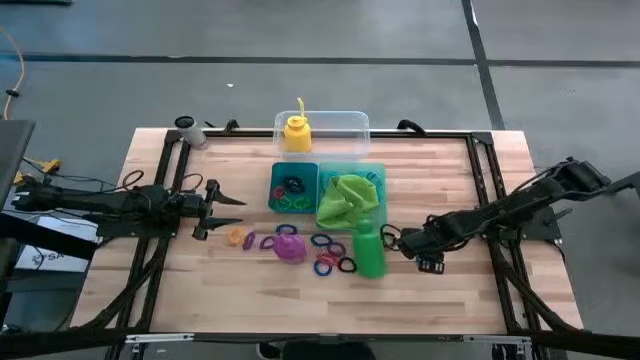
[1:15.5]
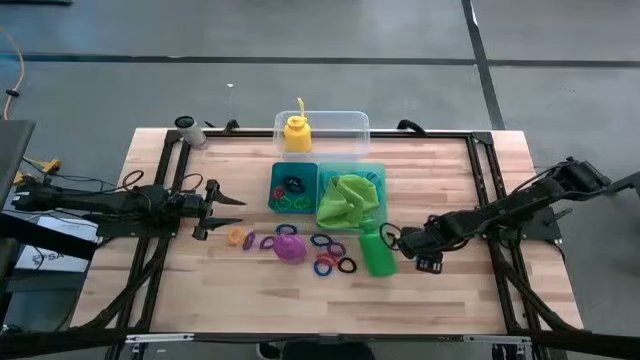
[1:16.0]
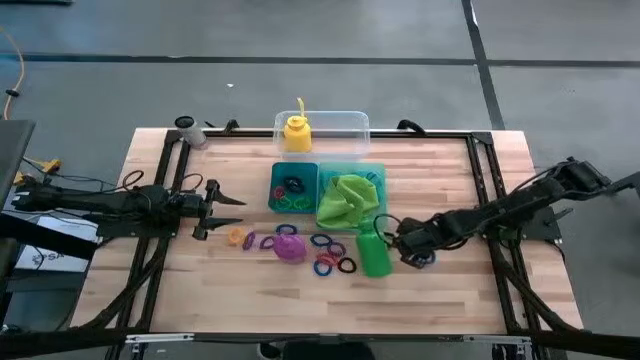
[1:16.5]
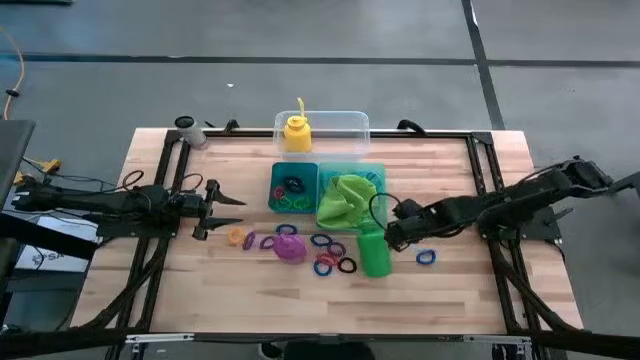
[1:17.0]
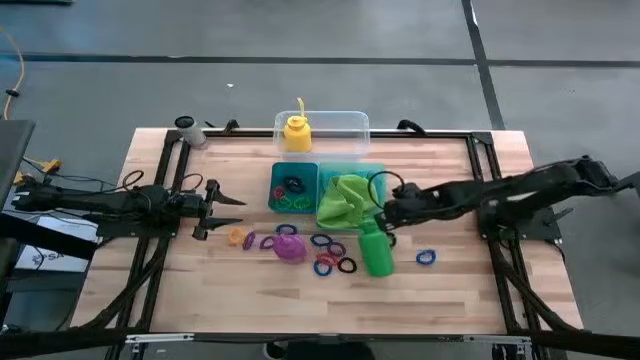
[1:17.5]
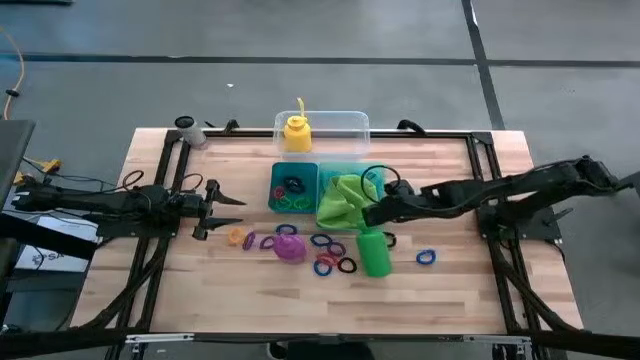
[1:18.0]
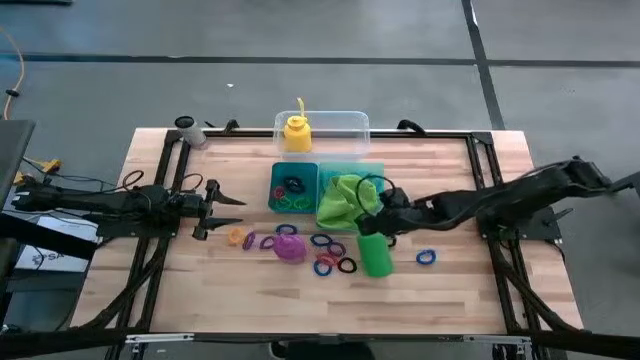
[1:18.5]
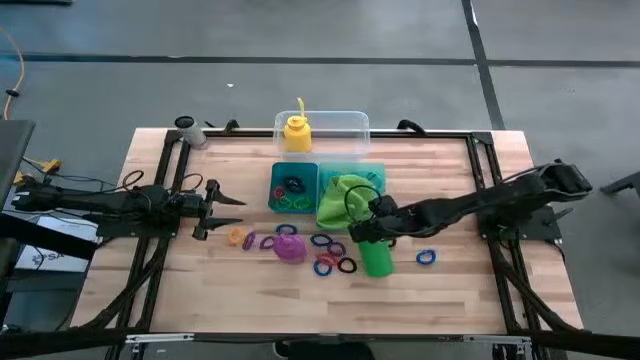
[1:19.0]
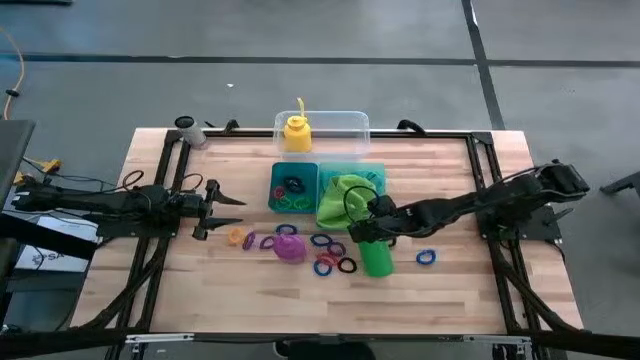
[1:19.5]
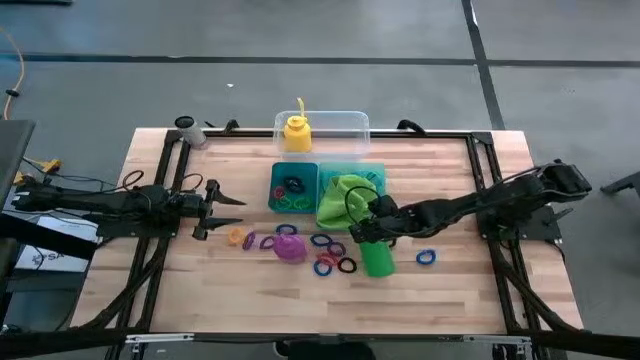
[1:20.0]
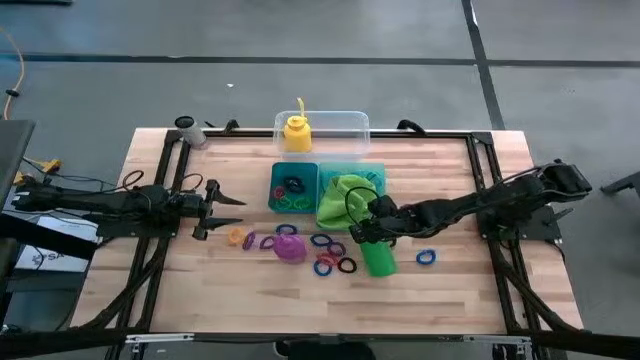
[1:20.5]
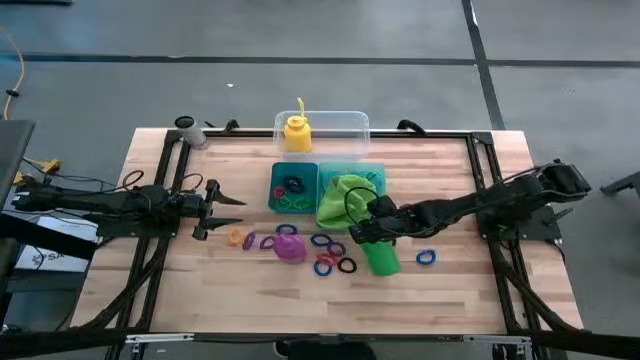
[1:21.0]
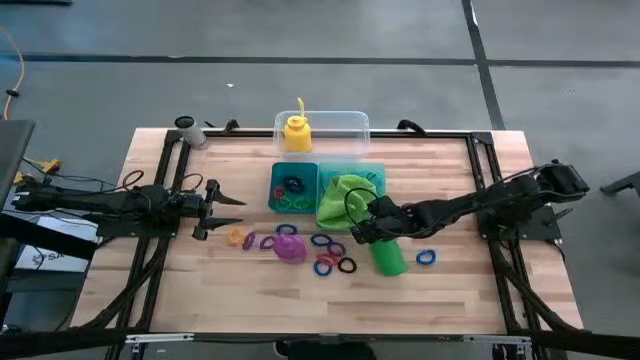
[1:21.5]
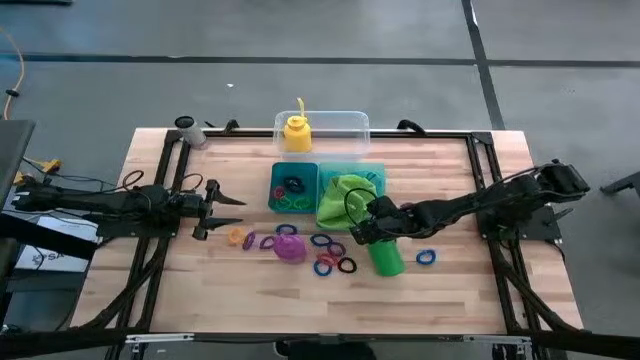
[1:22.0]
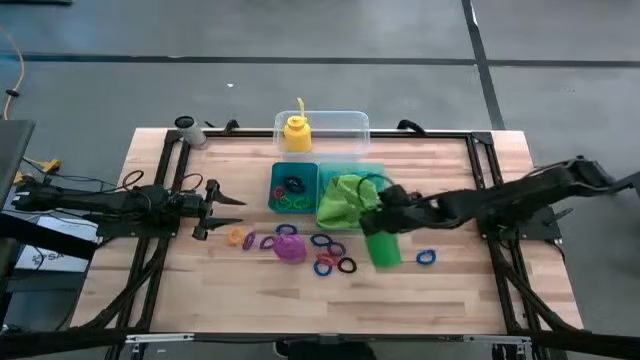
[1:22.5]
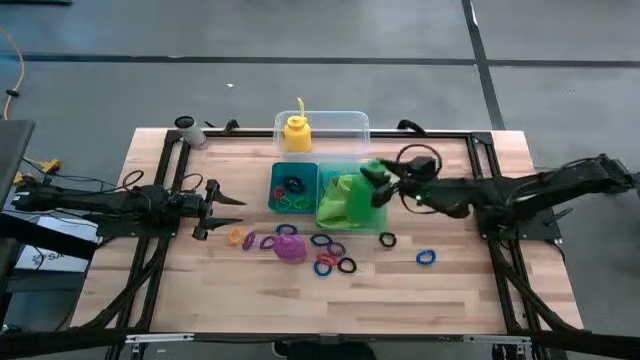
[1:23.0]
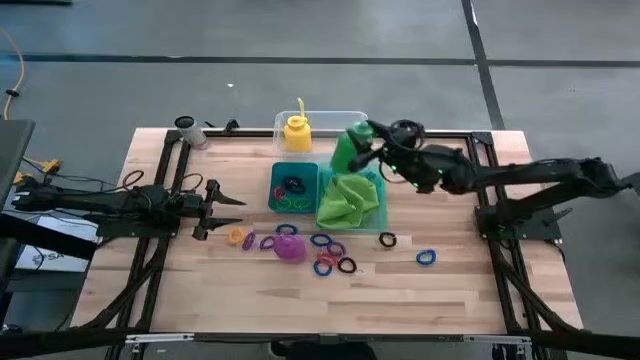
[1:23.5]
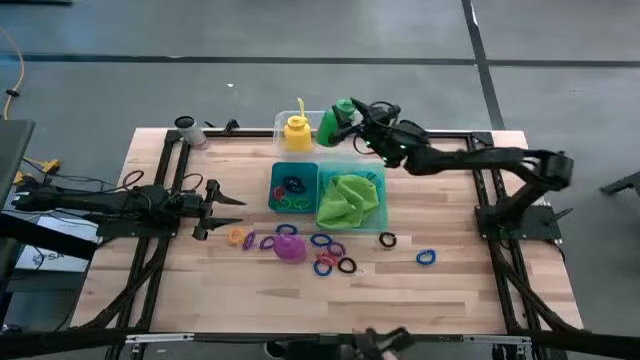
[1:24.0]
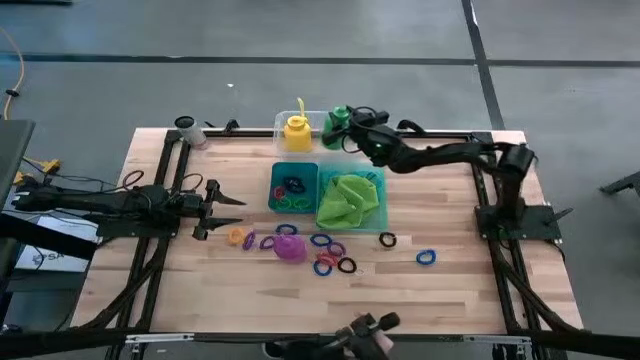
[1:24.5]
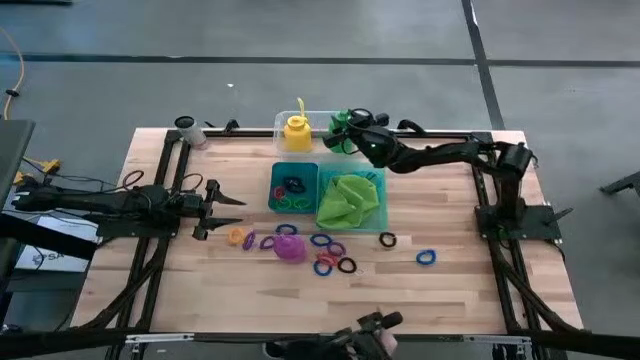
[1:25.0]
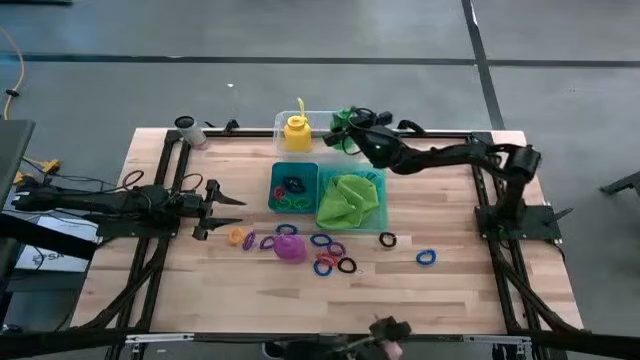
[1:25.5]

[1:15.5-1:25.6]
Task: Pick & Place Sports Items
Put the green tumbler into the transparent bin

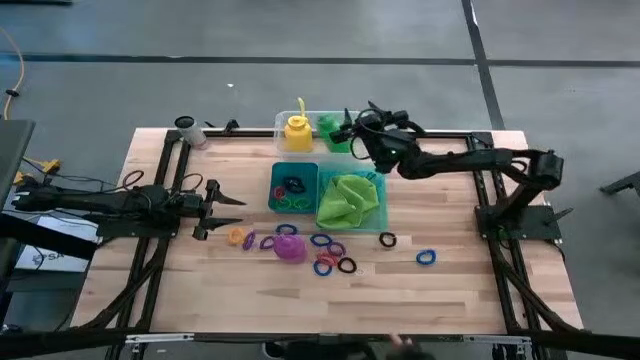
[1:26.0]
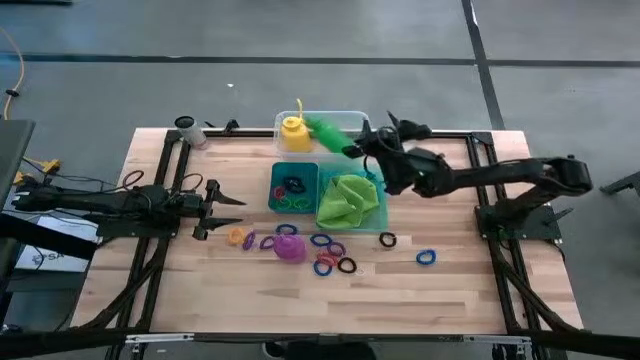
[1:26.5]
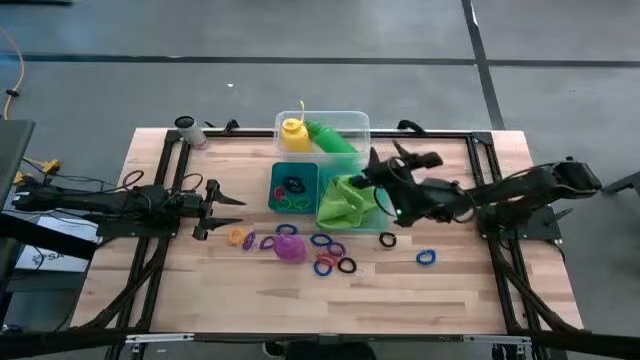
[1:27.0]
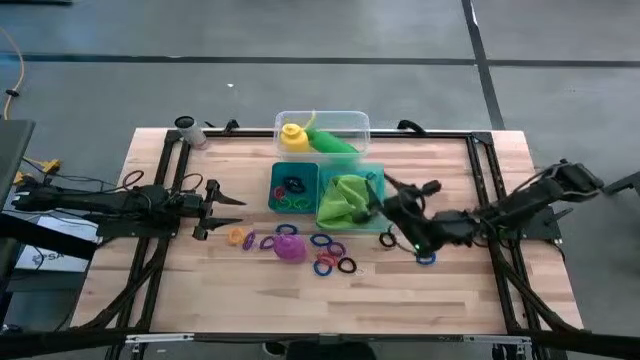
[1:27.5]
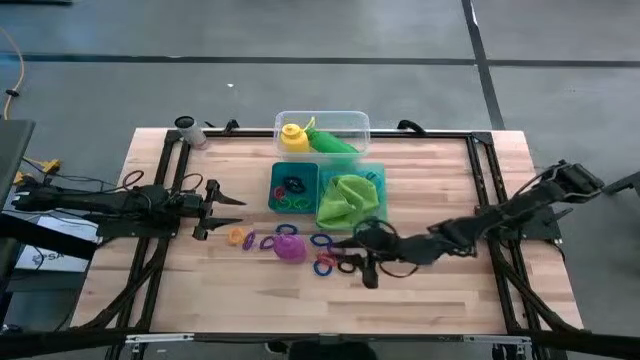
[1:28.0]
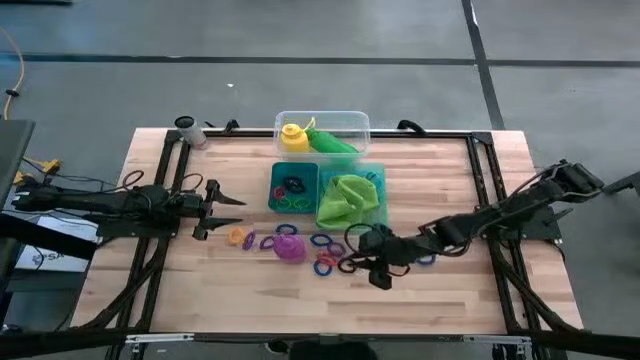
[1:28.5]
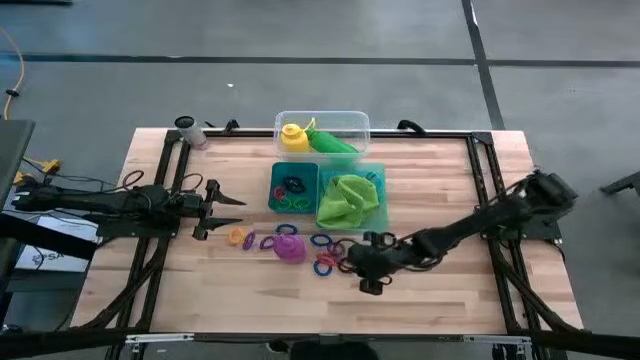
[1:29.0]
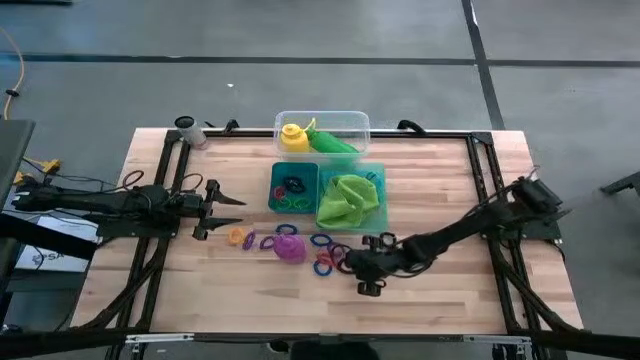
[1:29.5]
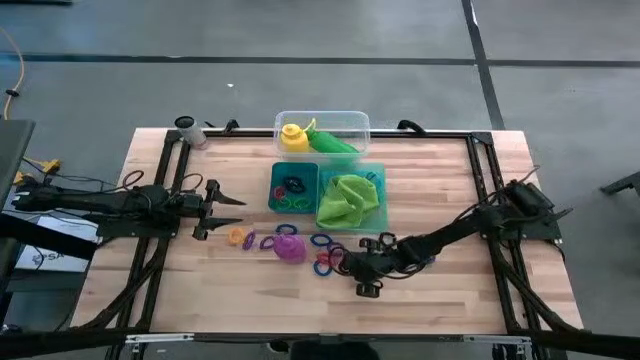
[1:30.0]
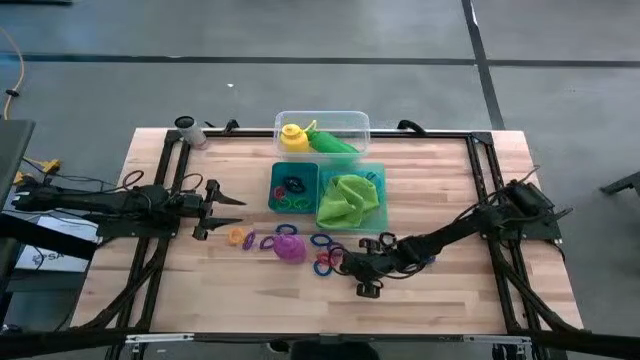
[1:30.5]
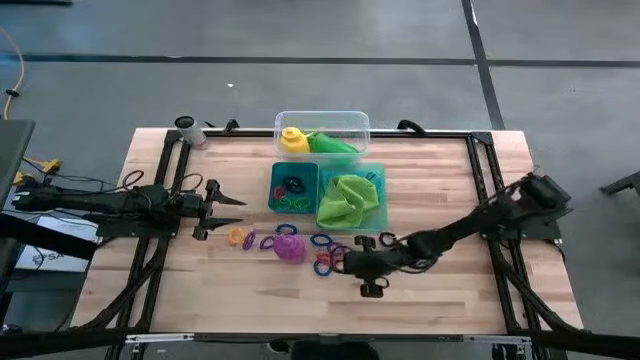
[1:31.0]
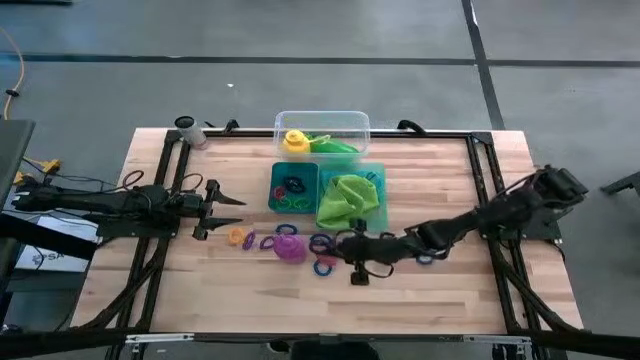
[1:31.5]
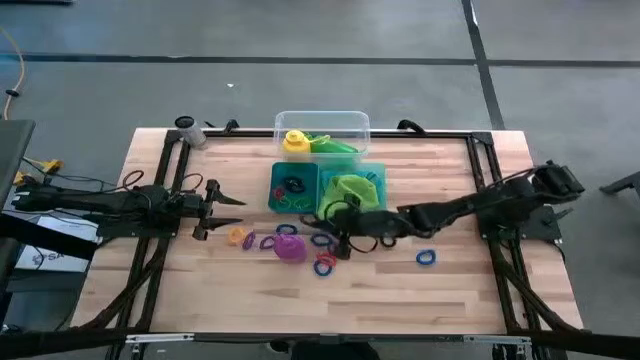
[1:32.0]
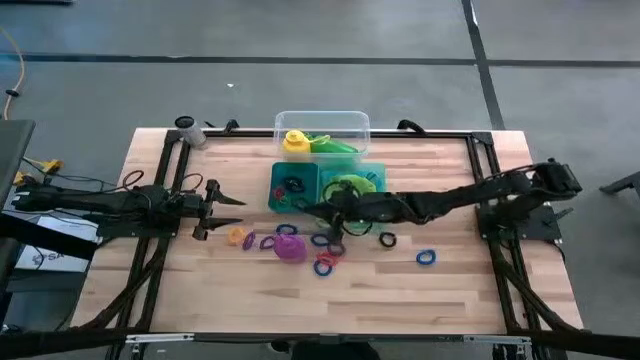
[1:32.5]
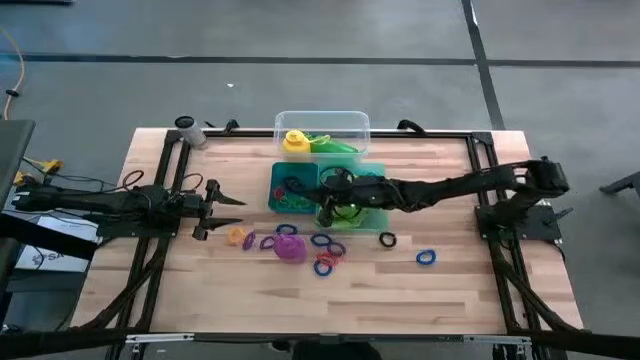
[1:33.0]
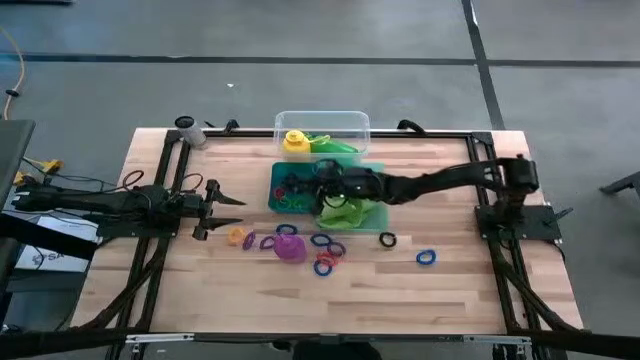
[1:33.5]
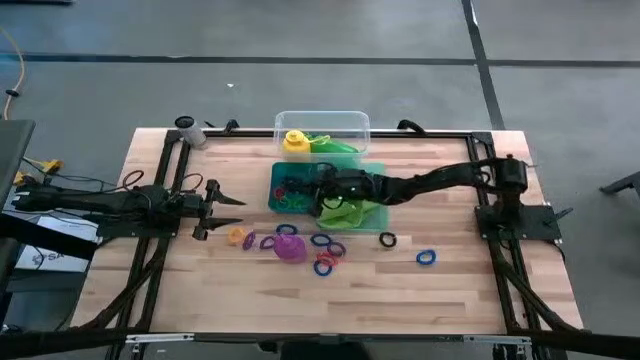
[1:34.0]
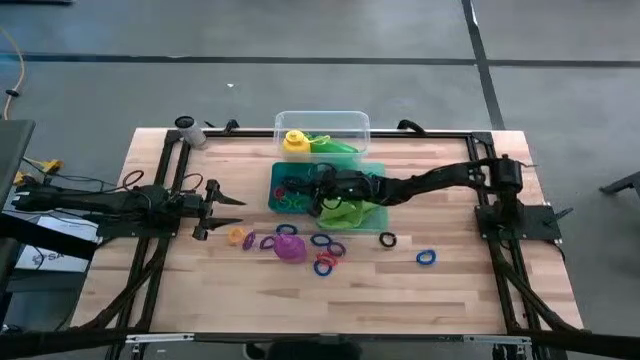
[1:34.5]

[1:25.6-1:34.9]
Put the bottom black spring keychain into the blue bin
